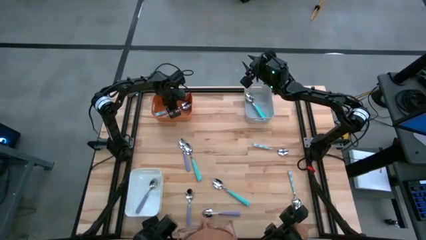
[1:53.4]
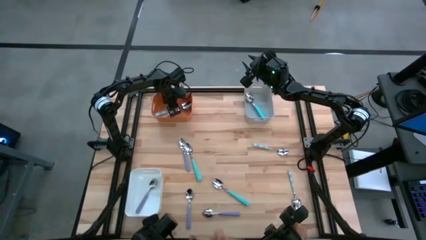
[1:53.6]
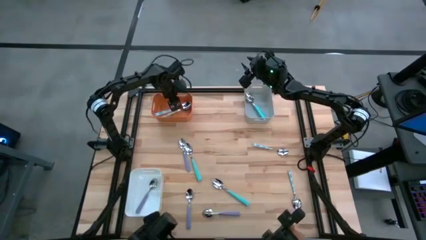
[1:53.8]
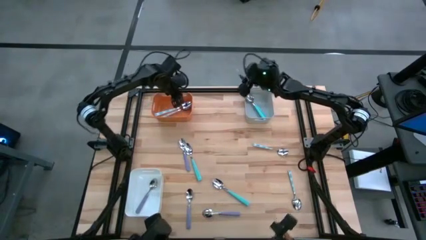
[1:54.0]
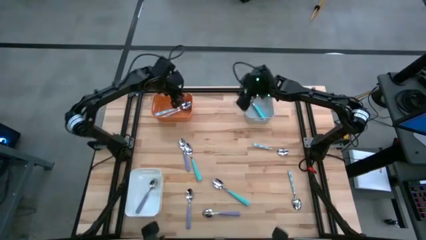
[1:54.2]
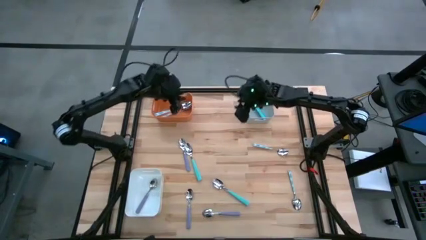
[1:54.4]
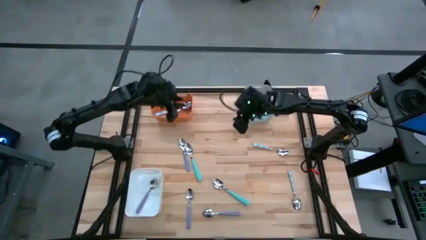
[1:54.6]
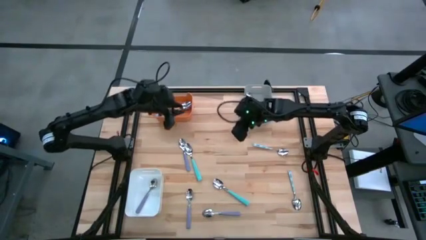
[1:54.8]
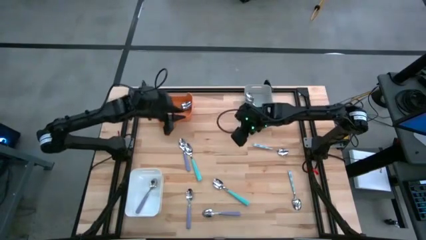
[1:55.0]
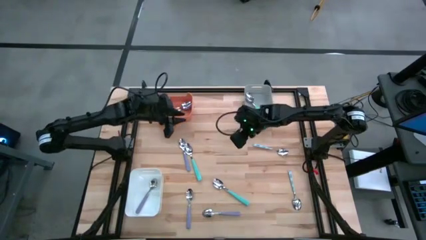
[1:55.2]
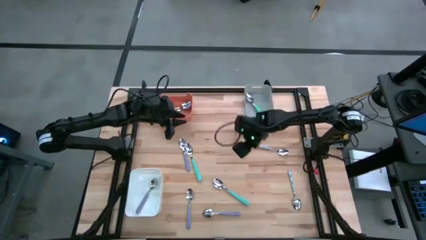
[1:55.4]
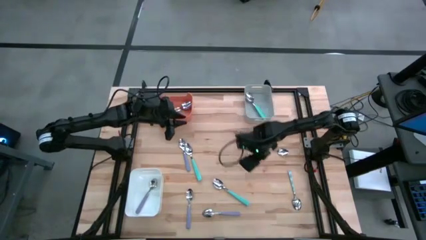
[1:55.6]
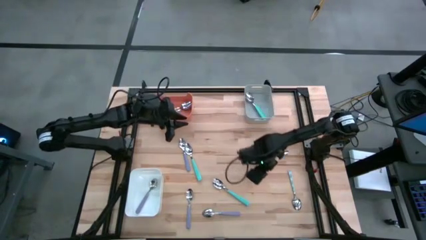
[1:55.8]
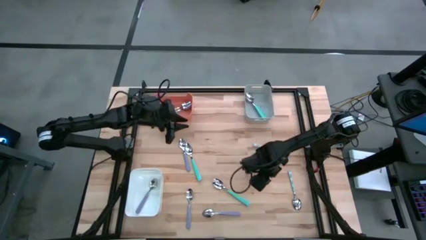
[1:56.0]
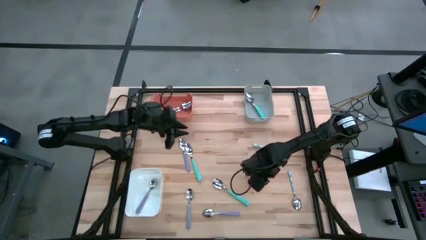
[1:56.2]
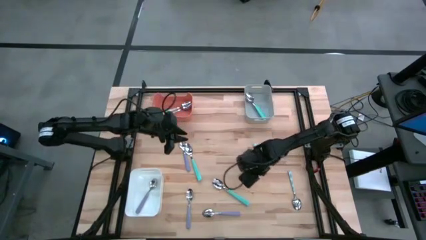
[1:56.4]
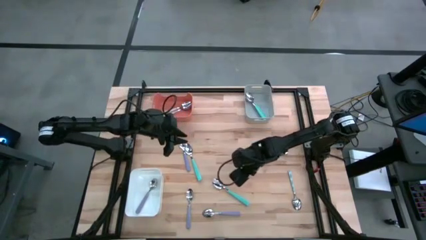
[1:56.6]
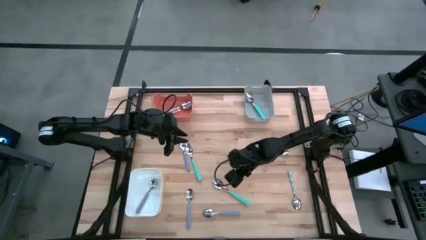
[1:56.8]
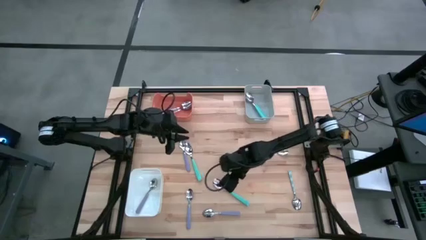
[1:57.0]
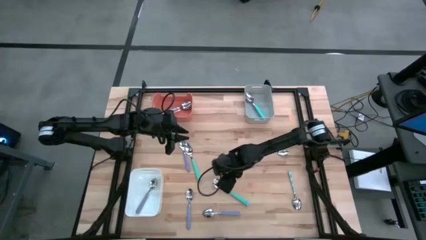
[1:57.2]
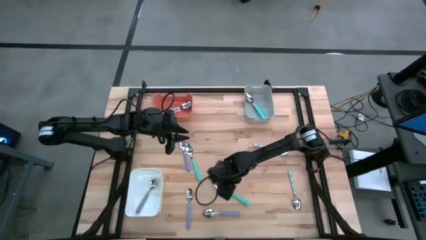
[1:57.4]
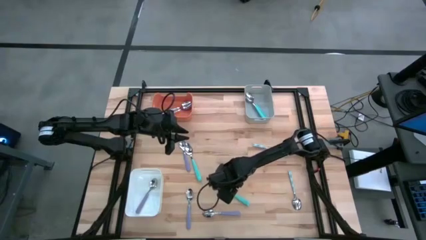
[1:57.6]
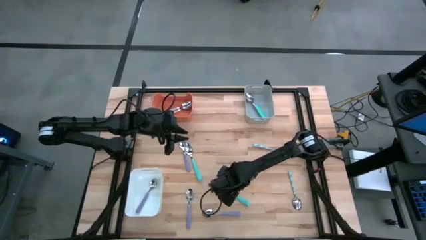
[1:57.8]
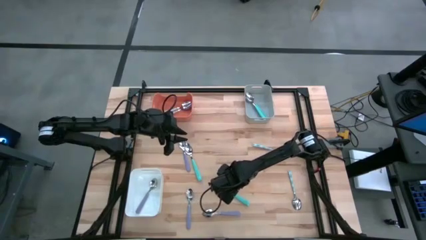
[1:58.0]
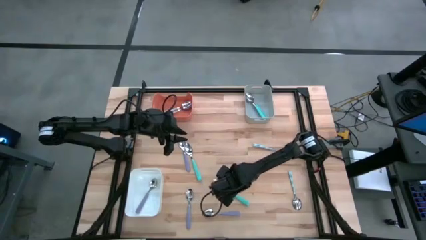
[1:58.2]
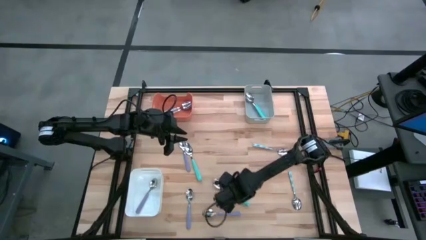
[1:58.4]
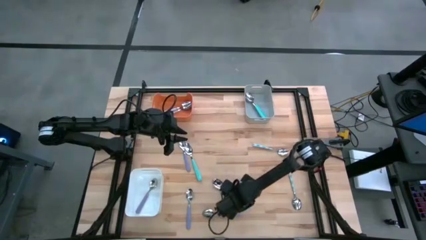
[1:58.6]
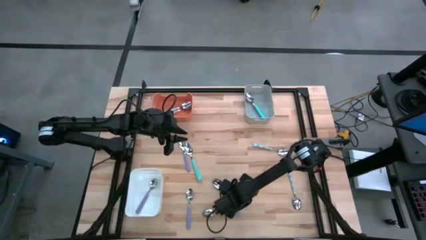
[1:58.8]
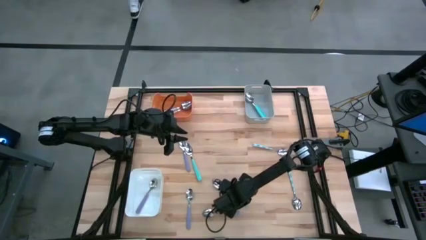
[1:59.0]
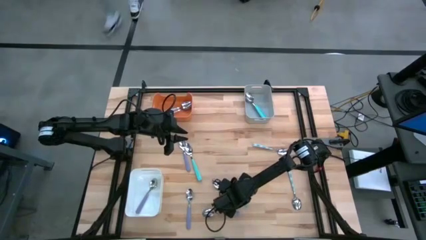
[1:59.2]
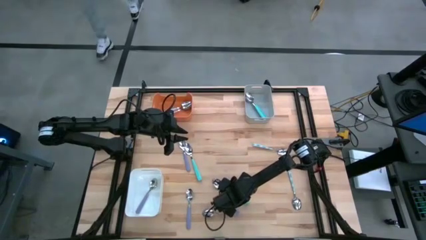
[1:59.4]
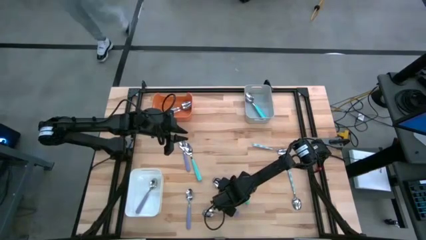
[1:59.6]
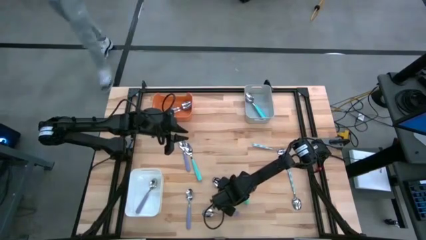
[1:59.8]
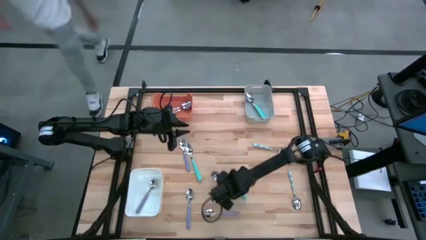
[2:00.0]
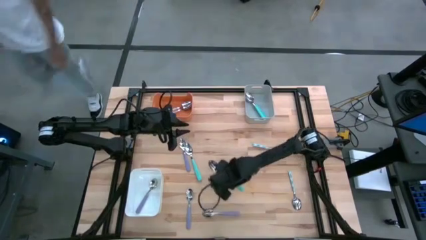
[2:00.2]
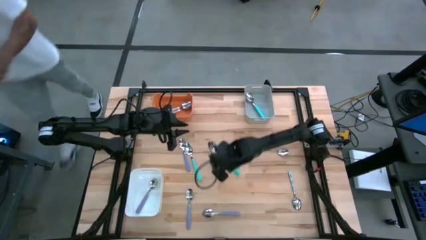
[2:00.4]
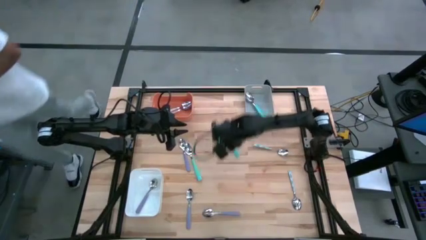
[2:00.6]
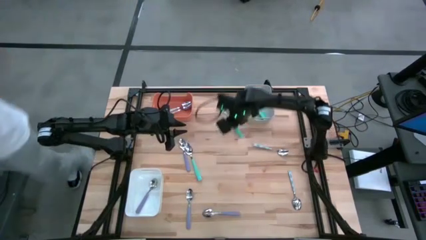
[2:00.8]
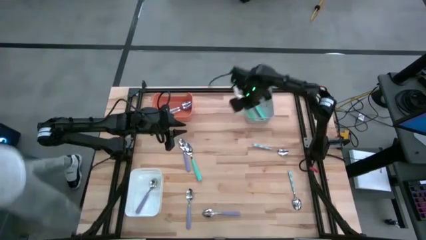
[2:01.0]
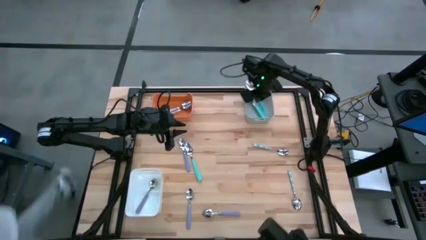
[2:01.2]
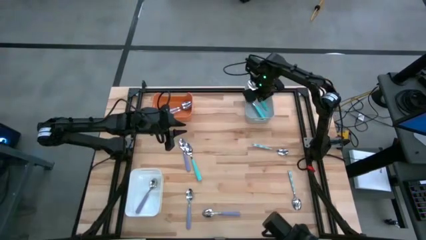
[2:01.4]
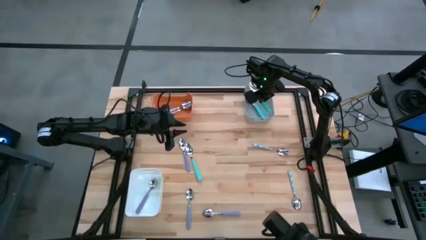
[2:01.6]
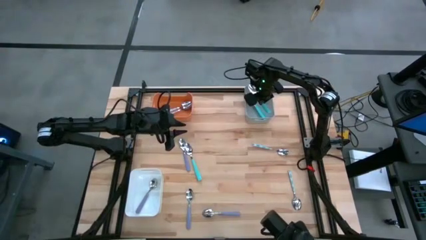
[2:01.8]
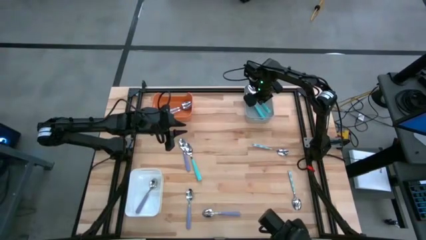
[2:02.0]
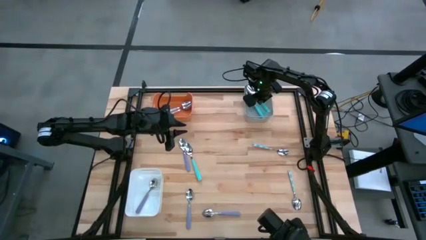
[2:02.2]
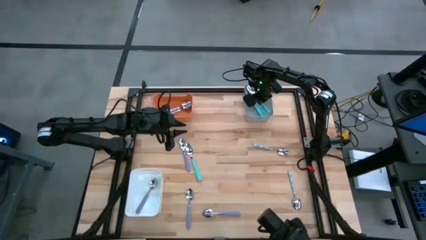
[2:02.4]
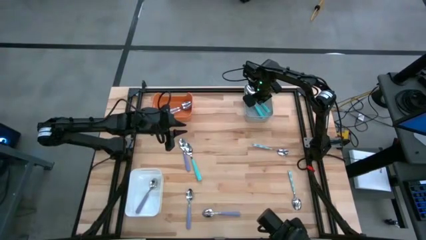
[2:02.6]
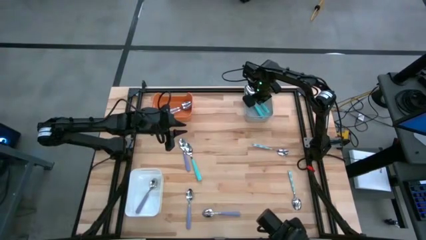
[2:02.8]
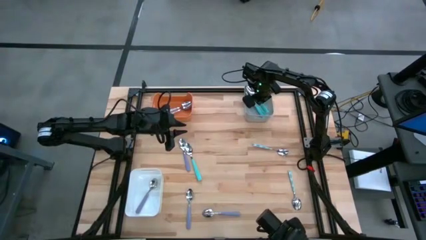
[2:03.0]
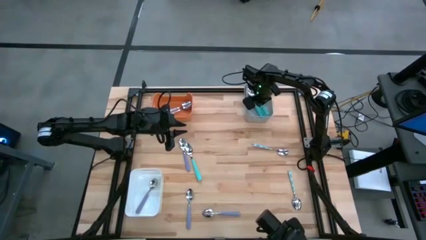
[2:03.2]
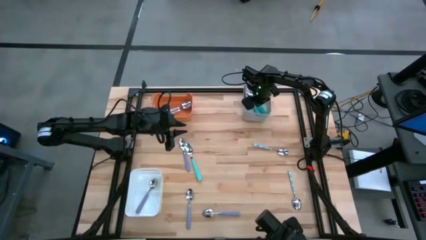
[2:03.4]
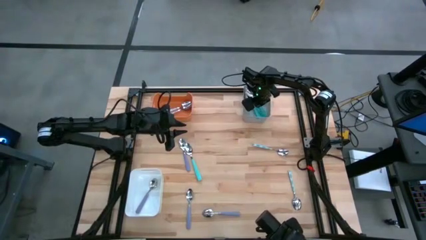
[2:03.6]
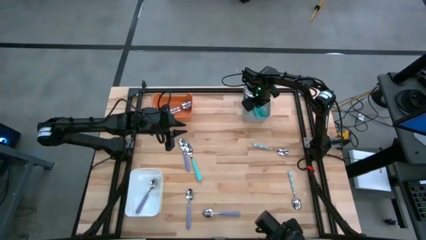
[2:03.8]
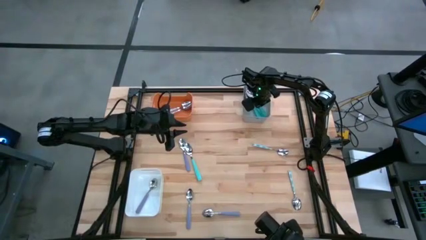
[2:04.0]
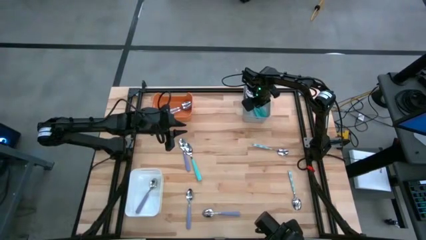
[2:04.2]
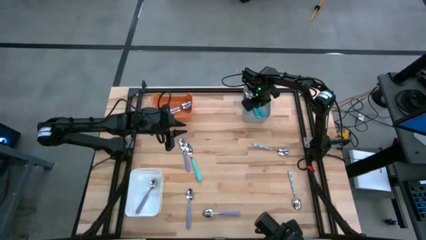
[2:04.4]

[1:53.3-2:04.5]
Task: Sort silverware by color (type)
Put the bottom light blue spoon into the gray bin

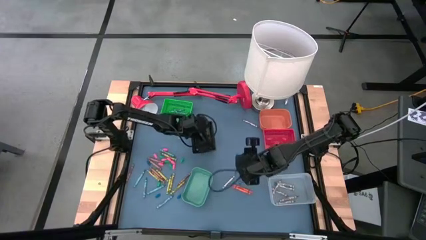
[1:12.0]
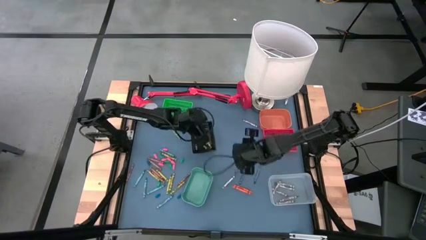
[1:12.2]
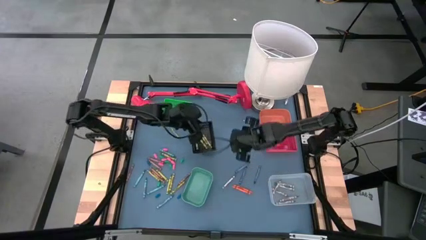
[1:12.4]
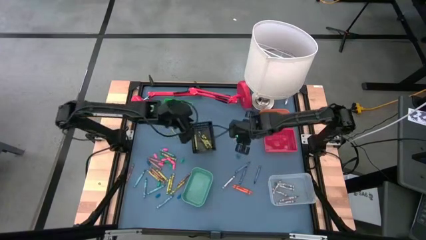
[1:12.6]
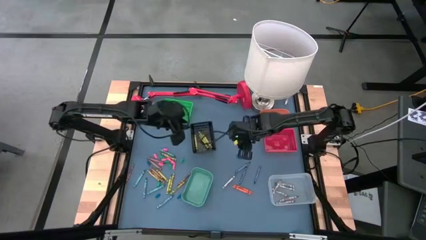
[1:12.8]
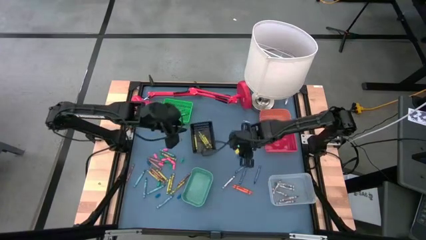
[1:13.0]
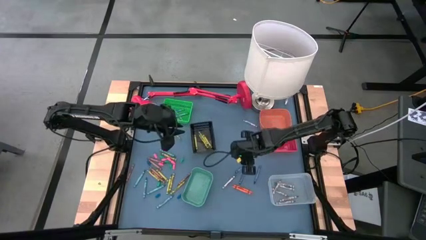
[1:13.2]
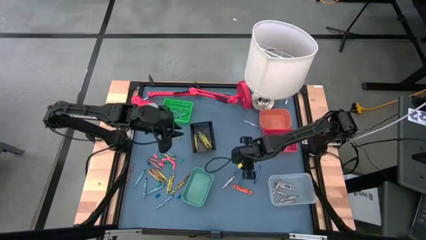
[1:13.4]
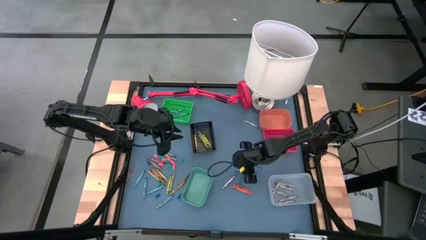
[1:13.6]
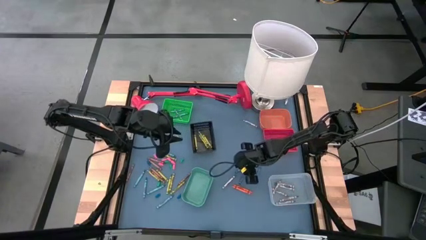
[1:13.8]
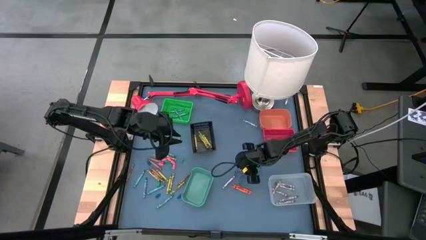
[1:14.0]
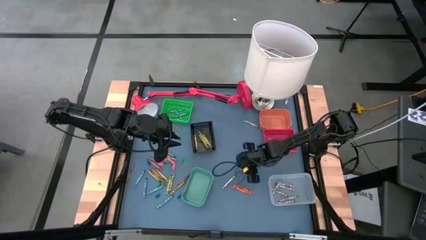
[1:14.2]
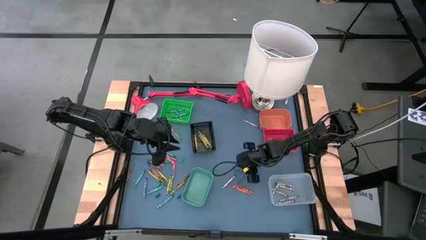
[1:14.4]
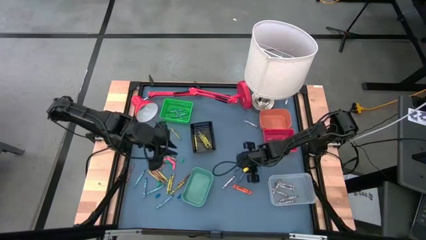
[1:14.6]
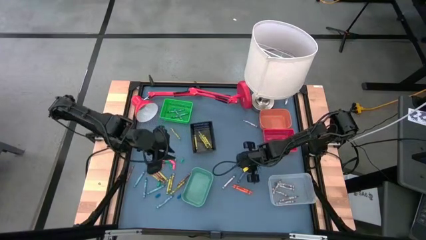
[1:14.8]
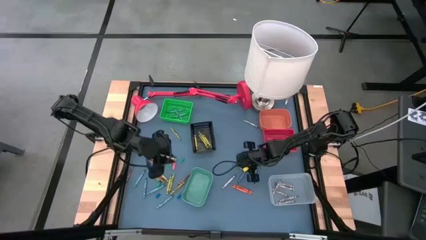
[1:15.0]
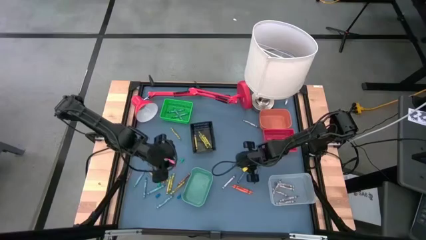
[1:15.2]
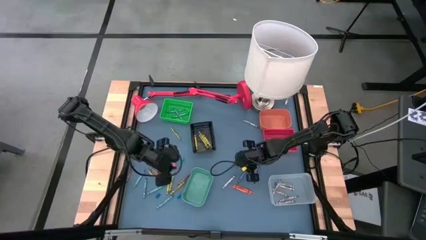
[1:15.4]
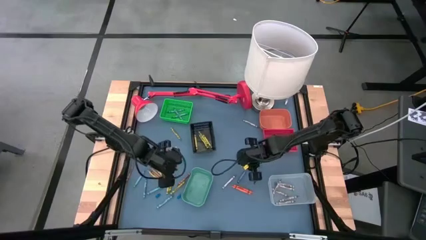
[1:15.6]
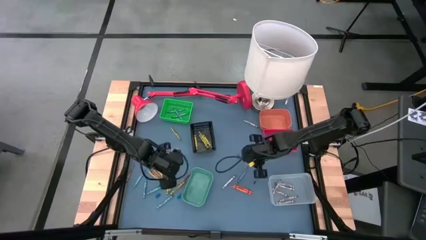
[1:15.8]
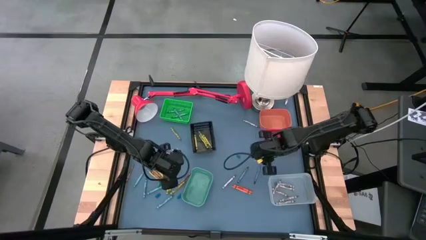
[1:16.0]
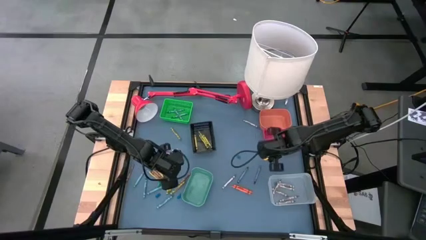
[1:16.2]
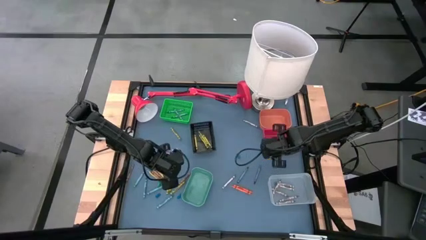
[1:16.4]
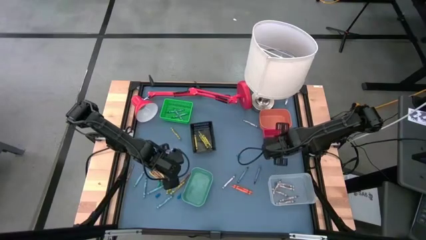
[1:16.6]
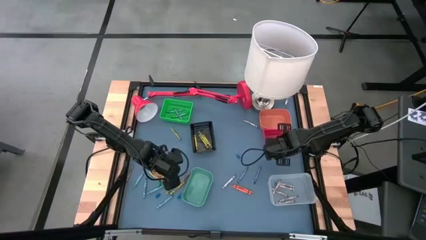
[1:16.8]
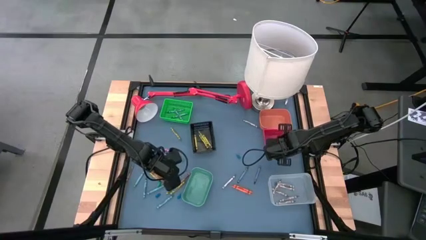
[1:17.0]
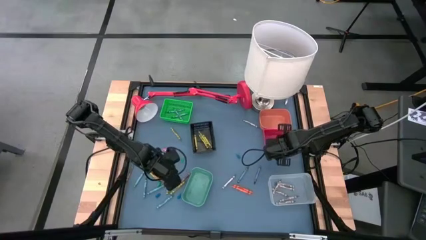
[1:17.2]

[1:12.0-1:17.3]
Task: Sort crayons
Put the dark blue crayon into the red bin
